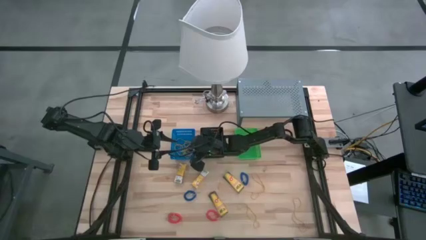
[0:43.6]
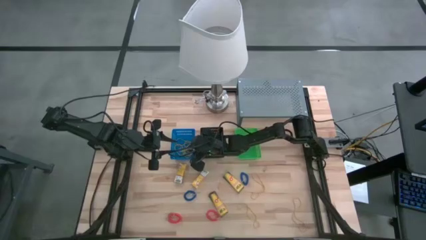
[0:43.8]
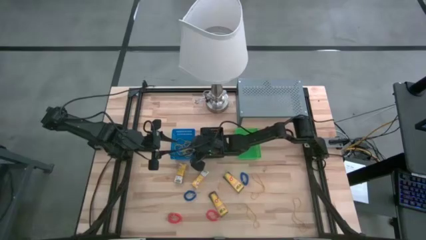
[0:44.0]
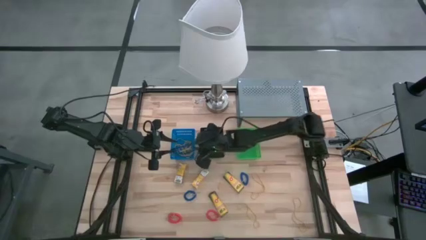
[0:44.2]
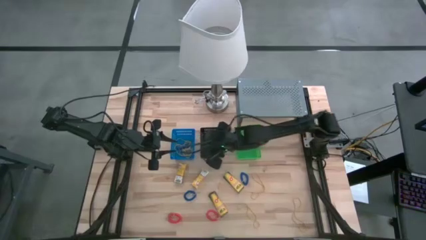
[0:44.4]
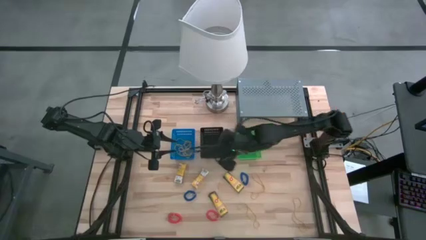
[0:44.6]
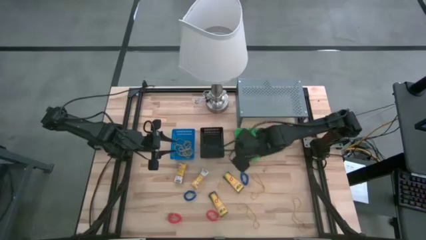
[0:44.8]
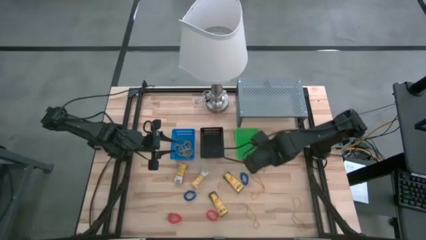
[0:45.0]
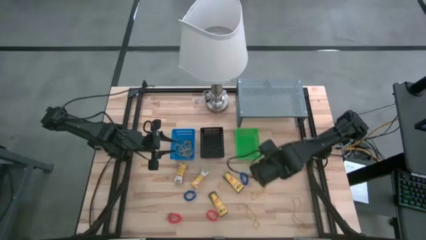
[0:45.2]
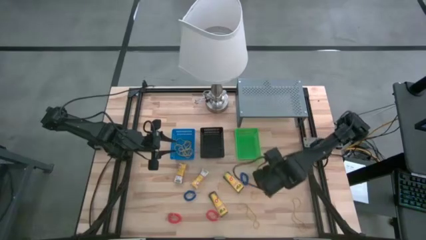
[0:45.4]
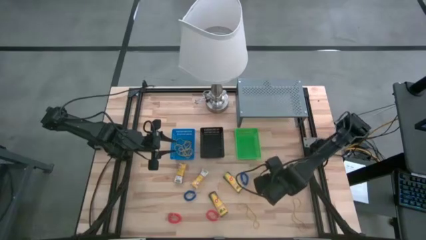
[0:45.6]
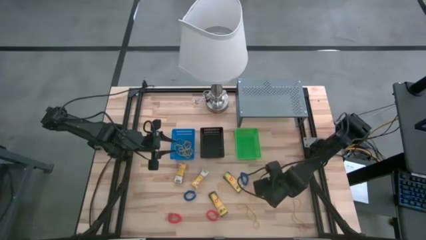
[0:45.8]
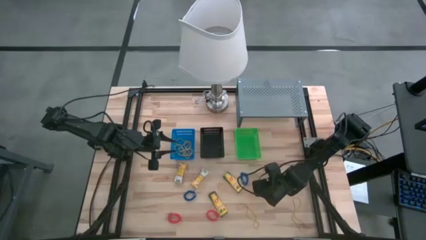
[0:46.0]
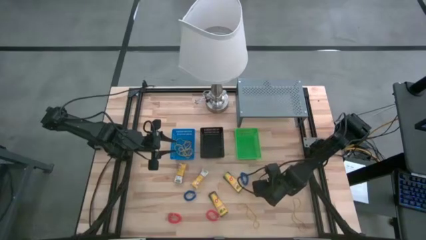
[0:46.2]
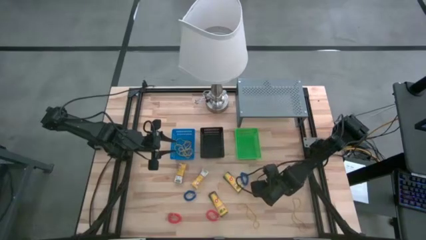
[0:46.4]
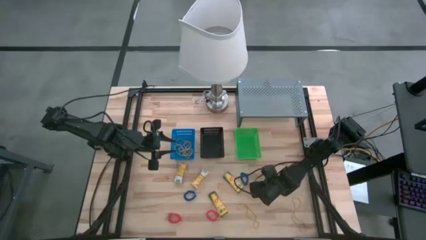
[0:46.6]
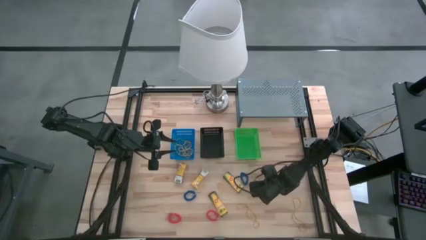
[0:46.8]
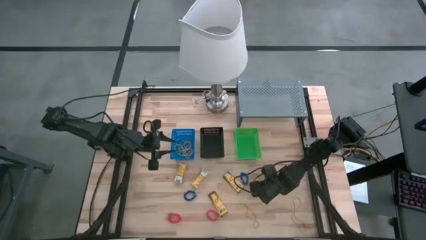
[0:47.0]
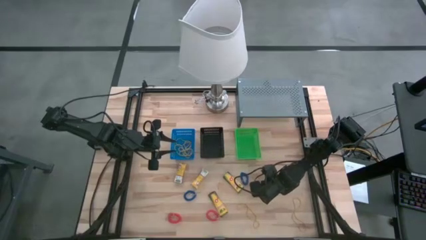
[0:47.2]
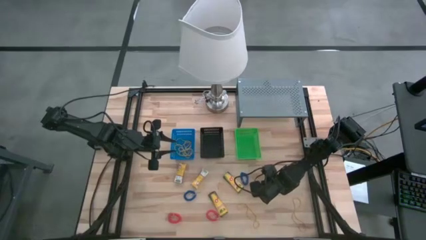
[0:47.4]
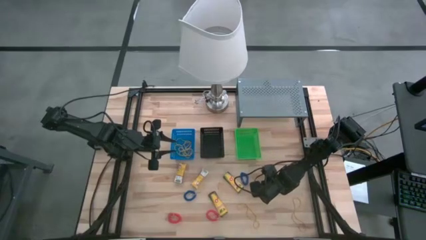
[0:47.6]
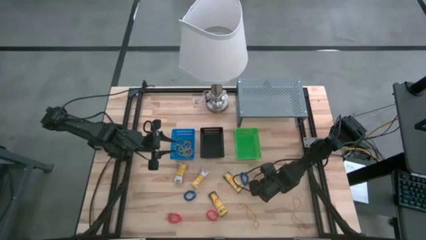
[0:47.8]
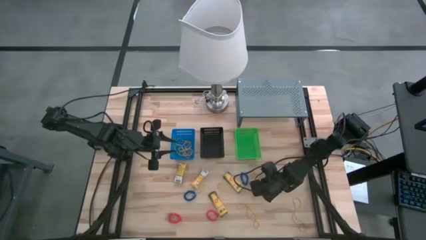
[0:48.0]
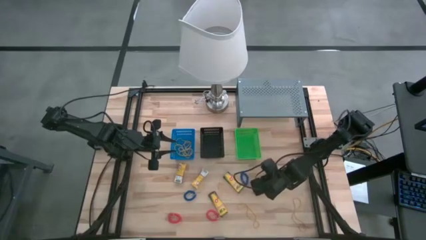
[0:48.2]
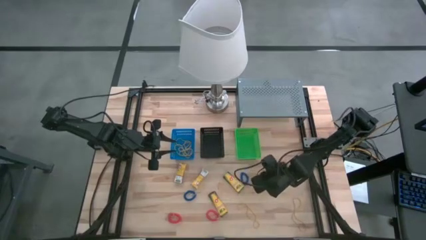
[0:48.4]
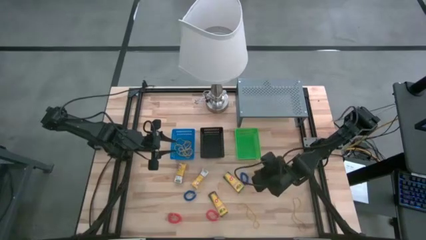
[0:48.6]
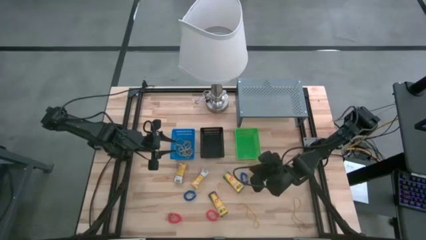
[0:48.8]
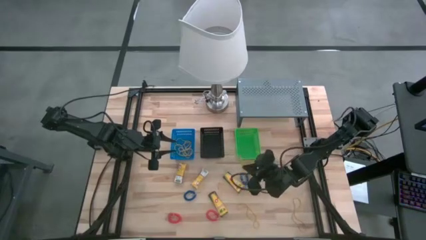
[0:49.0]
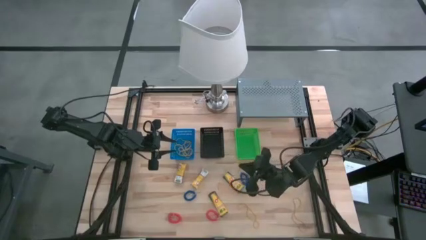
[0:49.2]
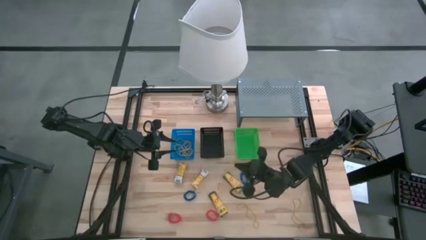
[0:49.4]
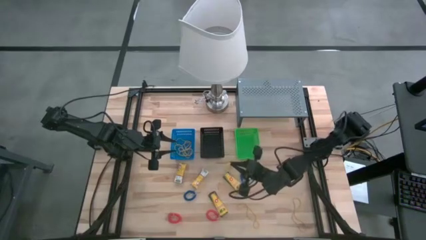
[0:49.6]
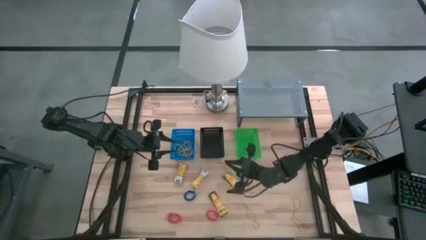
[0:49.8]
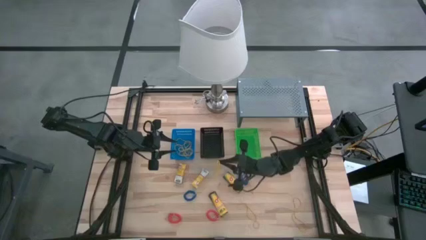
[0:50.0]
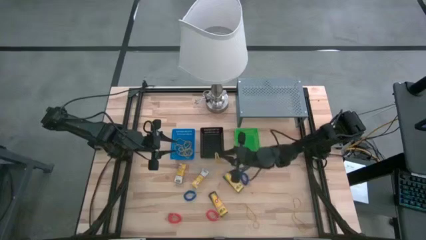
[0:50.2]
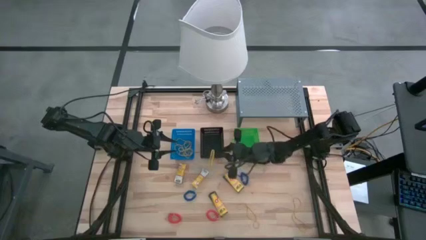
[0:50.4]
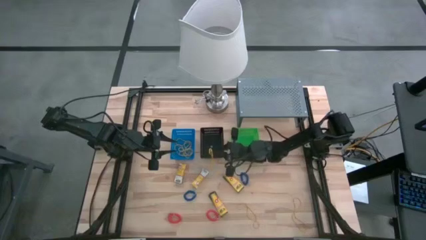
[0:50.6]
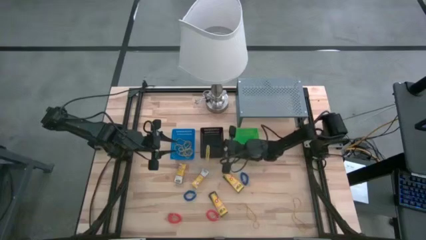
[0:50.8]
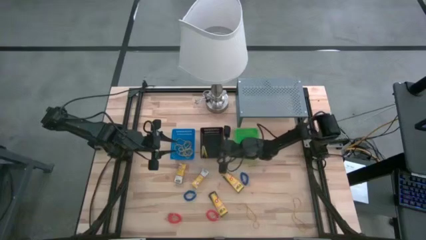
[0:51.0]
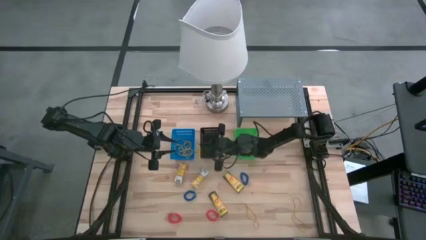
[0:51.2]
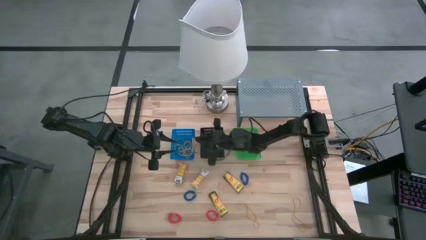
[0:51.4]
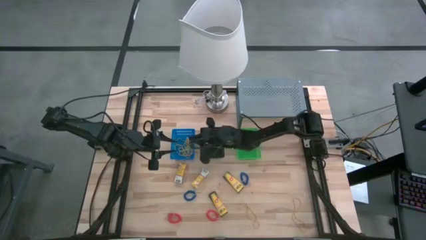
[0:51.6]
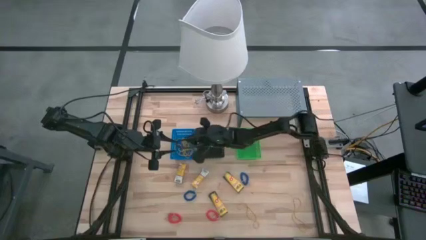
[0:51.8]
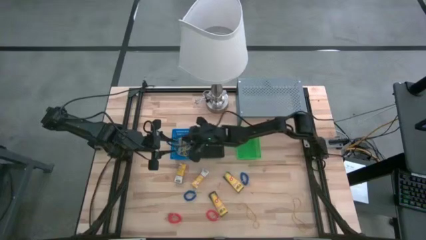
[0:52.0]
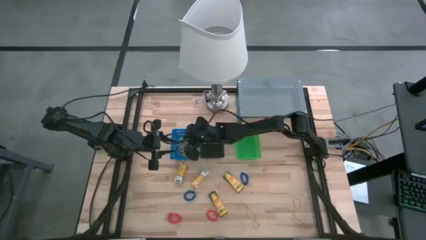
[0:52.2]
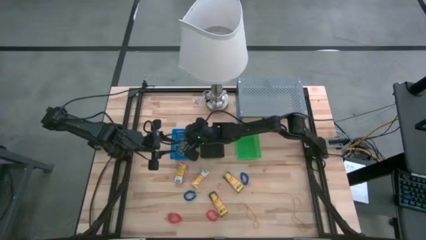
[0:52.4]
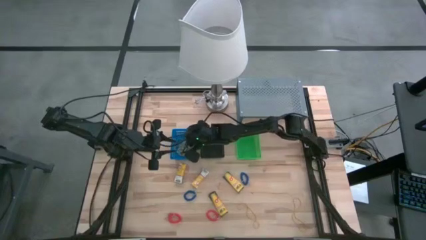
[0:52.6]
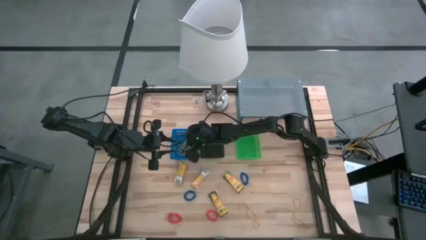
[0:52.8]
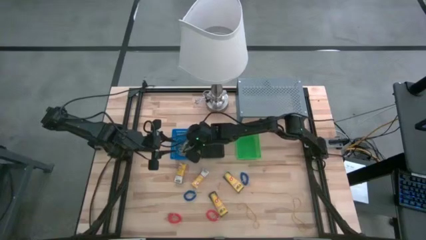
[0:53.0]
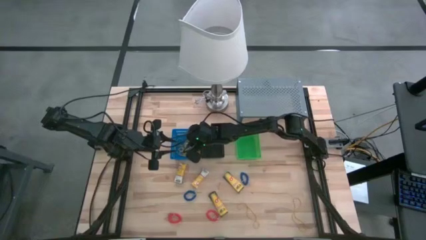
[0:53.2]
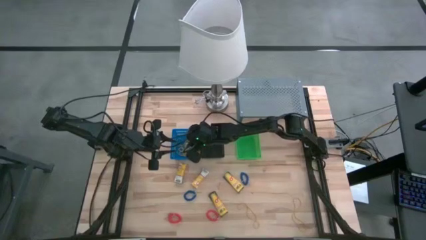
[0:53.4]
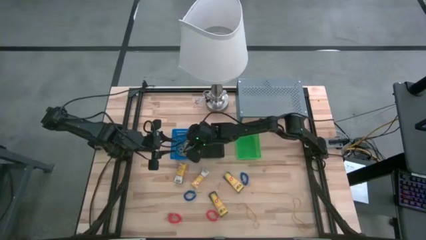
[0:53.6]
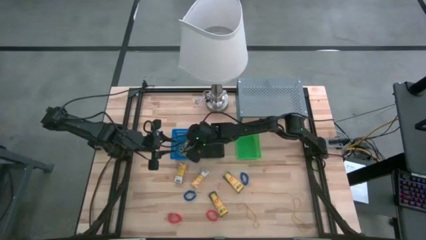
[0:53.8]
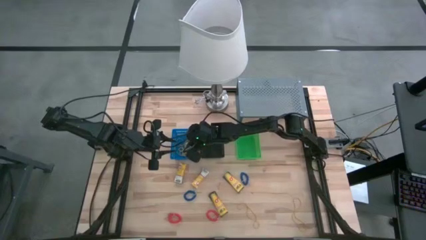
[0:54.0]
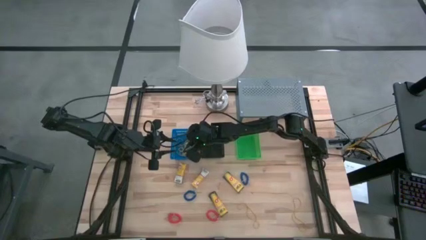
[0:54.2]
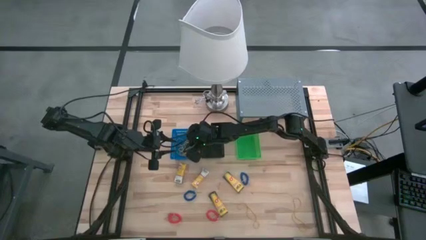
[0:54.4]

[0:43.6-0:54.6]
Task: Pick & Place Office Desk Supplies
Put the yellow rubber band into the blue bin

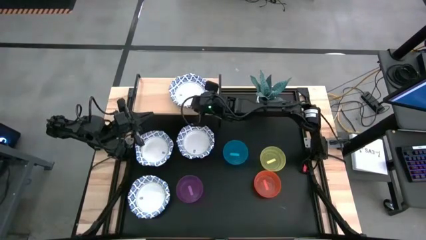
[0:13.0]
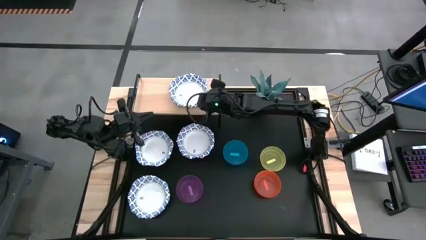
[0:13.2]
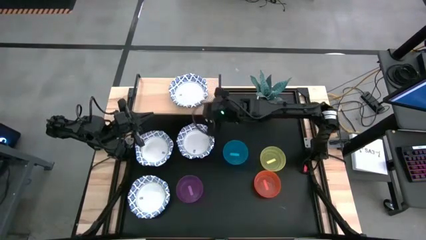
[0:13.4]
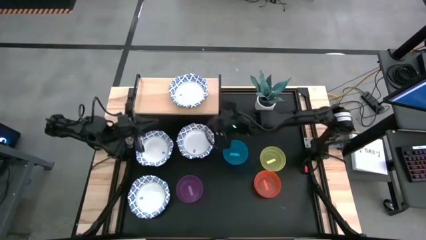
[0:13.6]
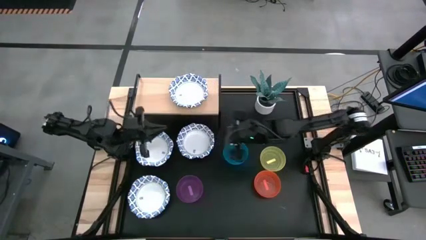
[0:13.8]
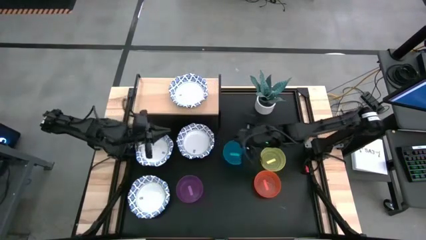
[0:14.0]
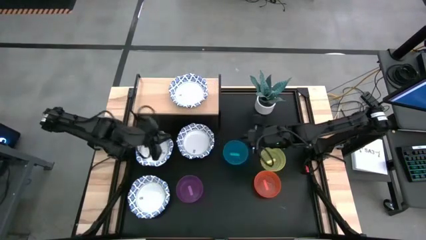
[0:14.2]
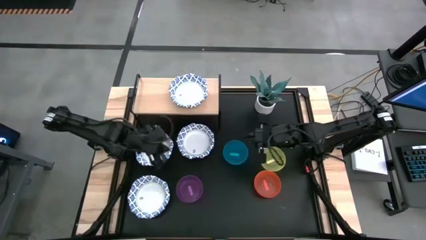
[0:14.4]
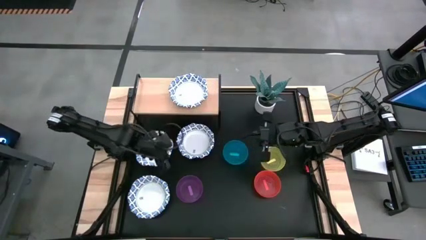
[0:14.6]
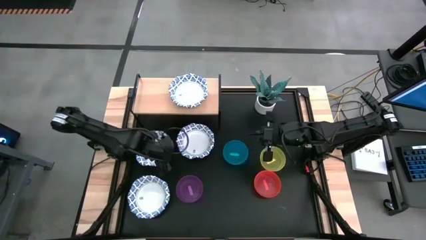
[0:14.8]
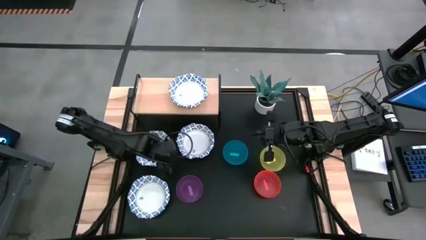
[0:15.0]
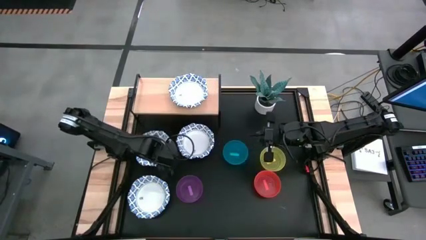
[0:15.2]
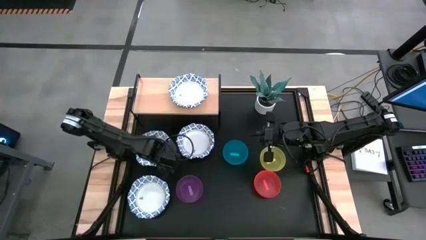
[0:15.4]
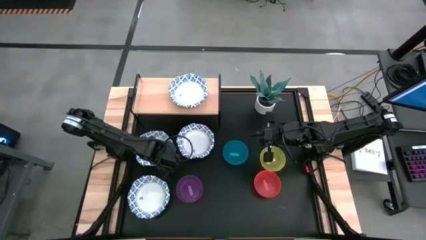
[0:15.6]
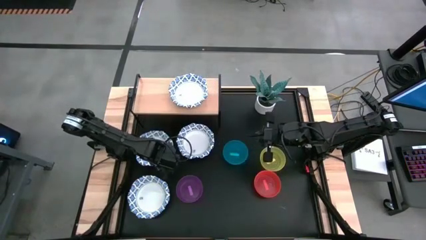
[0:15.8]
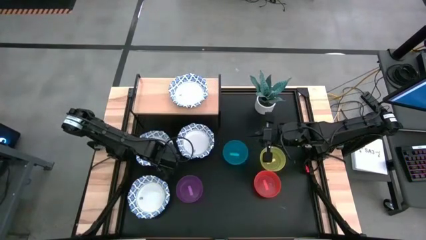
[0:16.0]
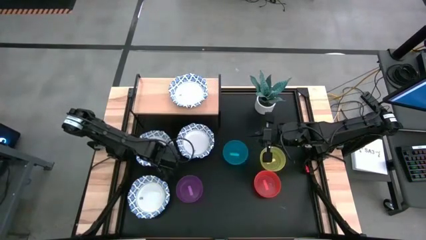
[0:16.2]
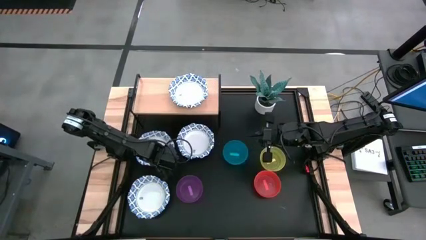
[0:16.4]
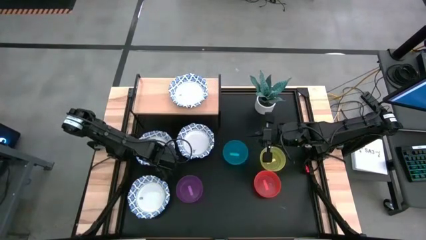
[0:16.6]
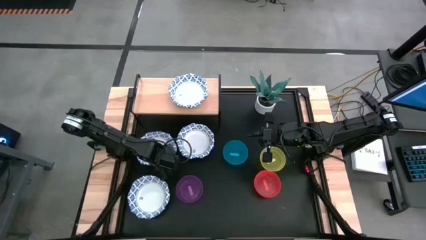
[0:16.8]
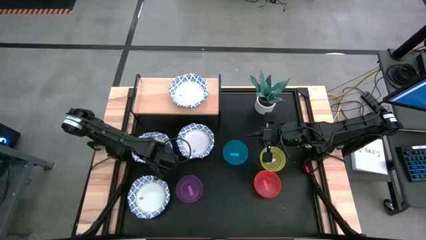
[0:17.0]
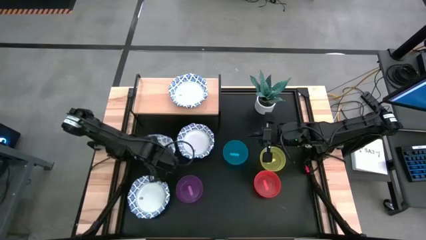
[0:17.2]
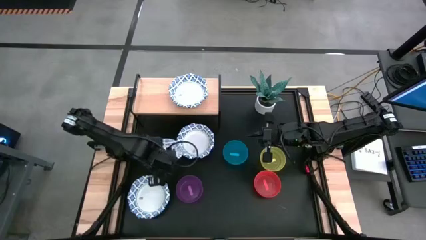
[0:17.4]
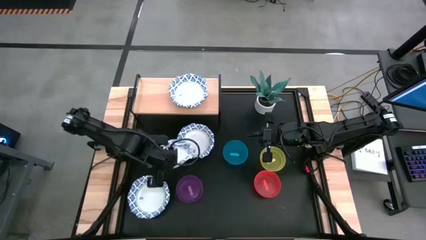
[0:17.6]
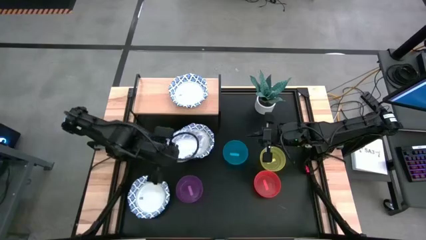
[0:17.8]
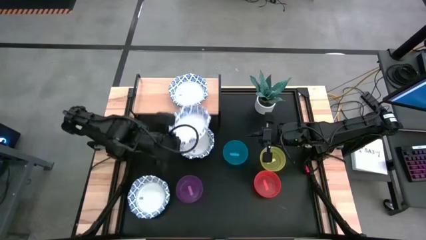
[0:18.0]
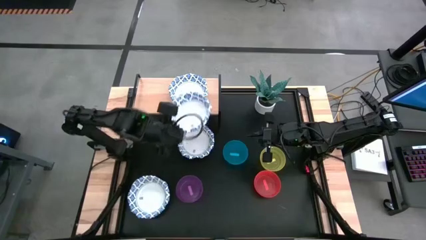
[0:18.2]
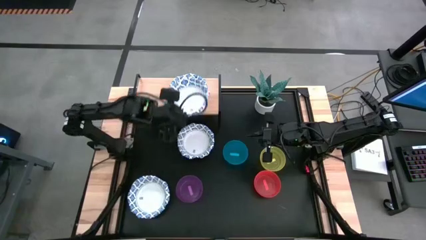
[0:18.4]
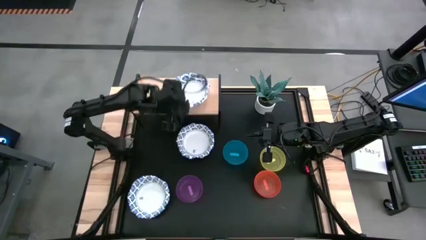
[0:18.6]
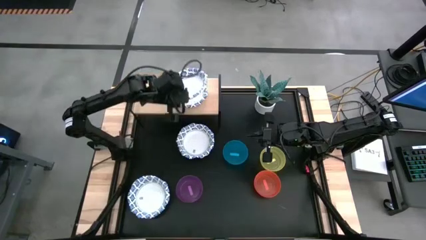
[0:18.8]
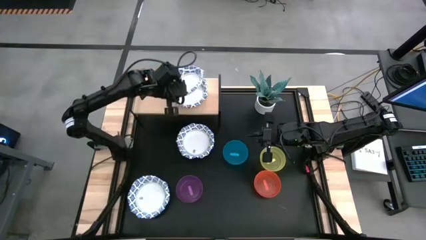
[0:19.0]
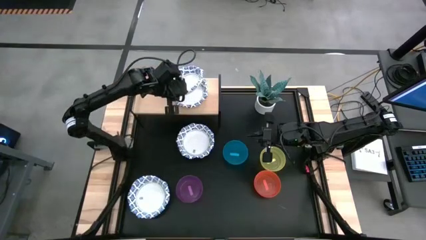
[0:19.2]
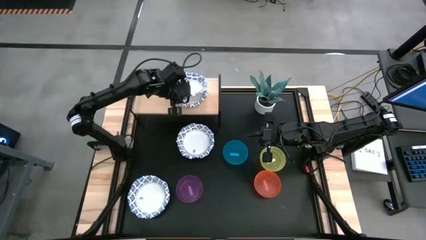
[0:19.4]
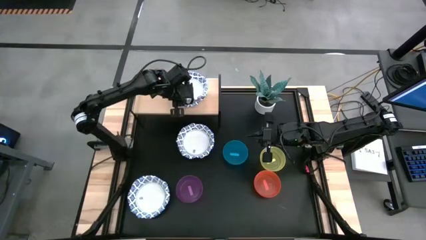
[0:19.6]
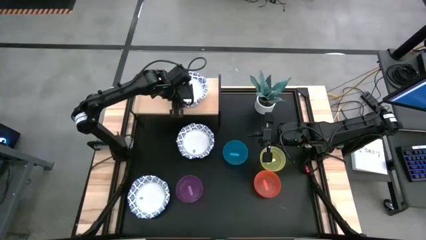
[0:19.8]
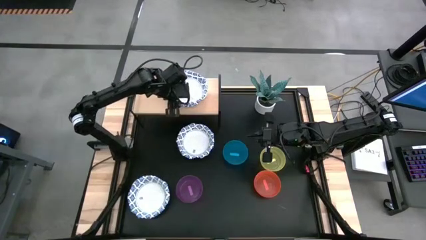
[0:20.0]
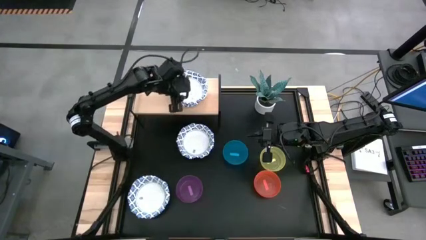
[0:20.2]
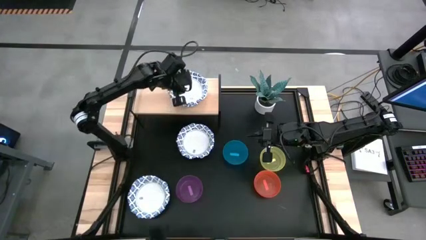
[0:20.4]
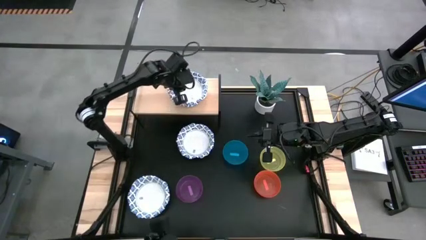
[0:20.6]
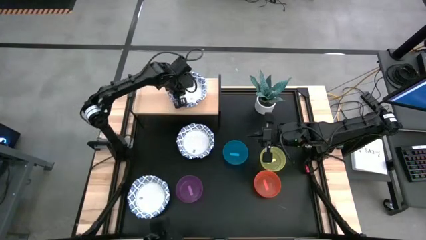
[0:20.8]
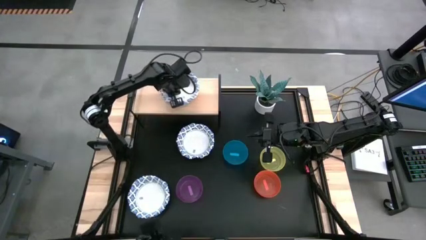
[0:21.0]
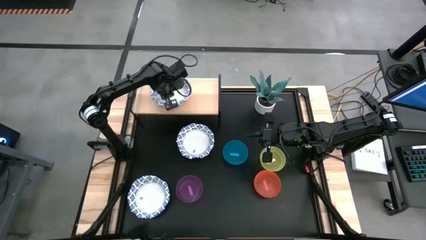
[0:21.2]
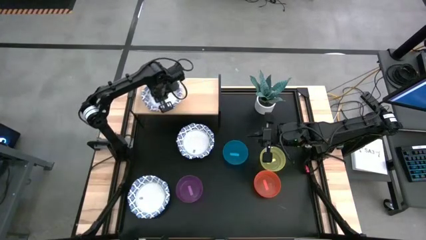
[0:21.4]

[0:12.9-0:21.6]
Task: Place and stack bowls onto a shelf
Stack the big white bowl on top of the big white bowl on the shelf
